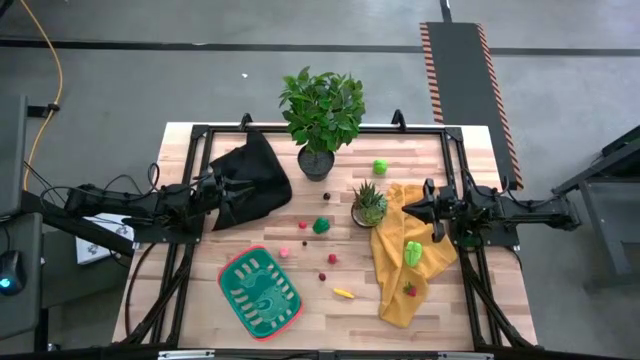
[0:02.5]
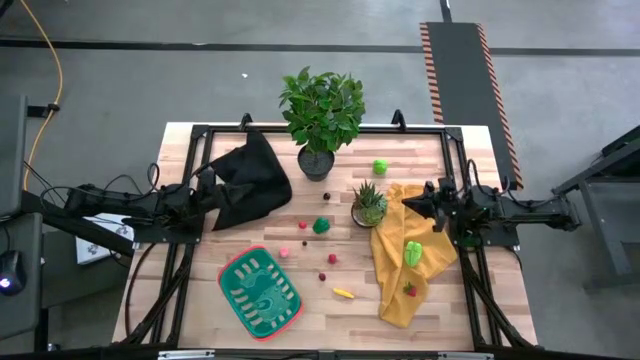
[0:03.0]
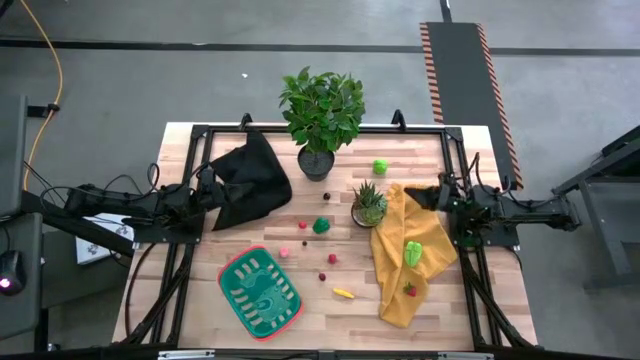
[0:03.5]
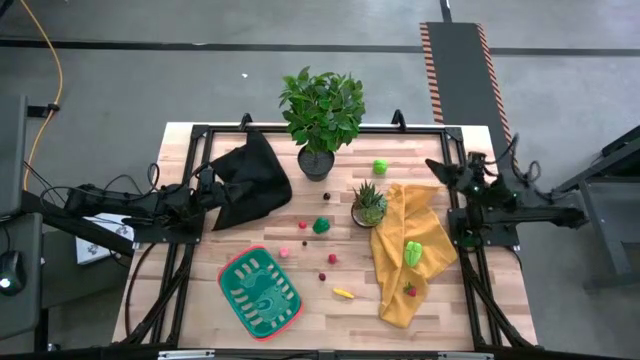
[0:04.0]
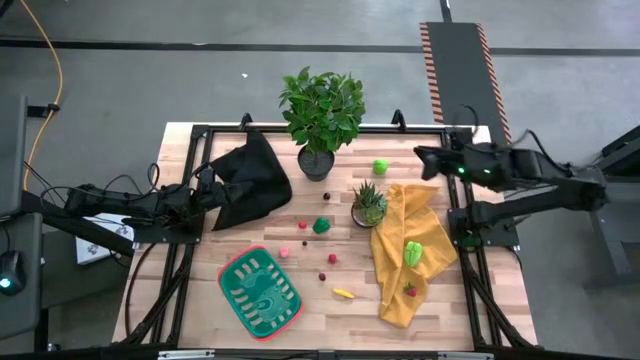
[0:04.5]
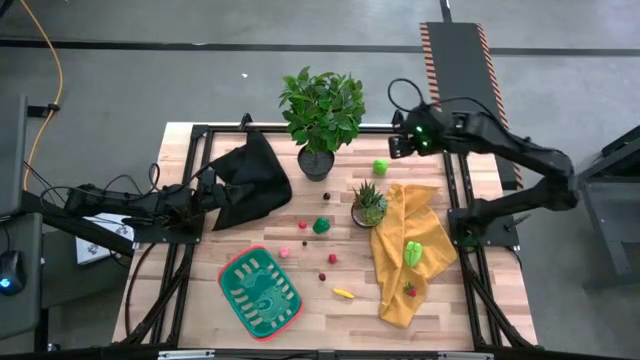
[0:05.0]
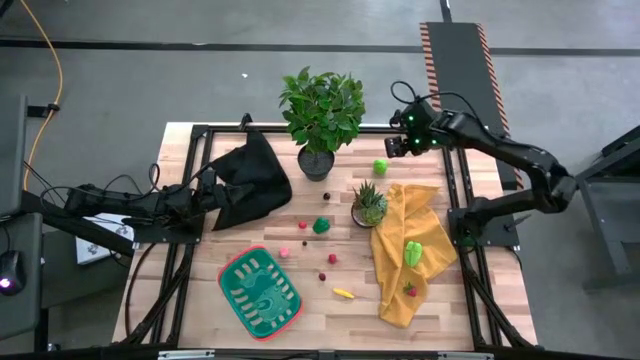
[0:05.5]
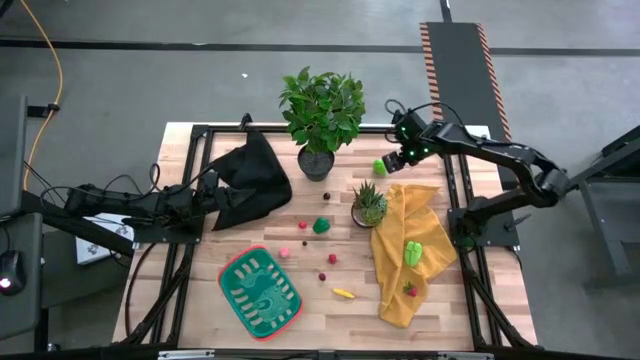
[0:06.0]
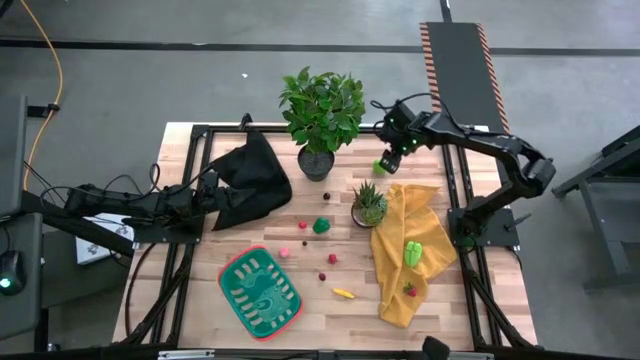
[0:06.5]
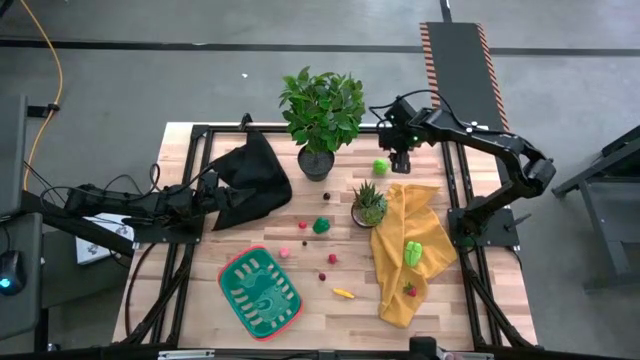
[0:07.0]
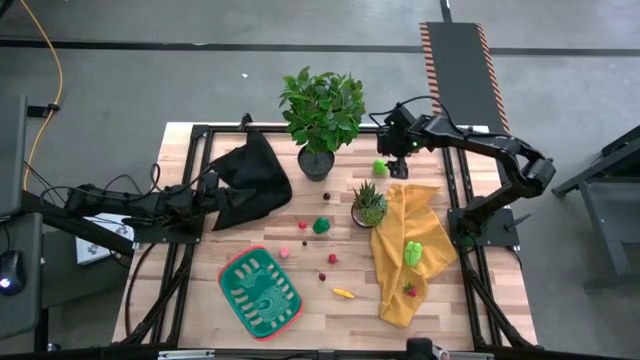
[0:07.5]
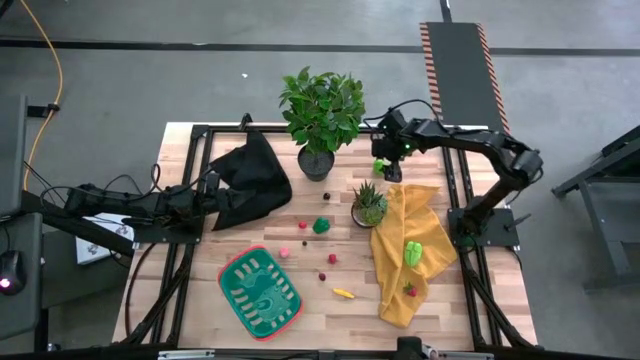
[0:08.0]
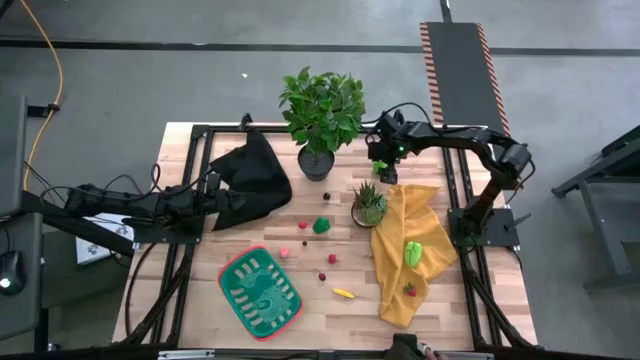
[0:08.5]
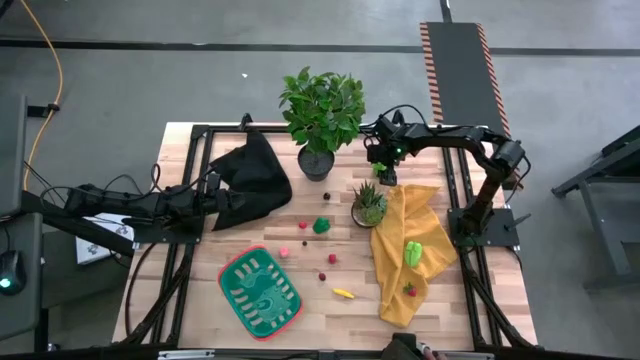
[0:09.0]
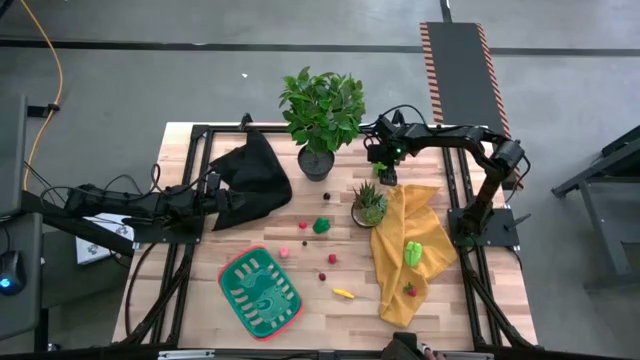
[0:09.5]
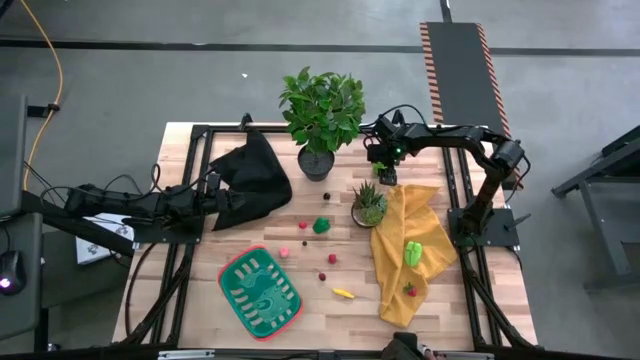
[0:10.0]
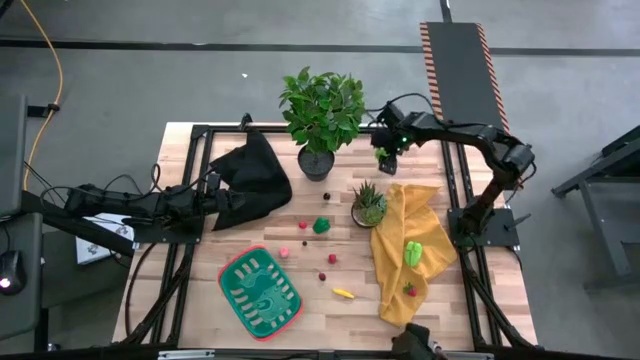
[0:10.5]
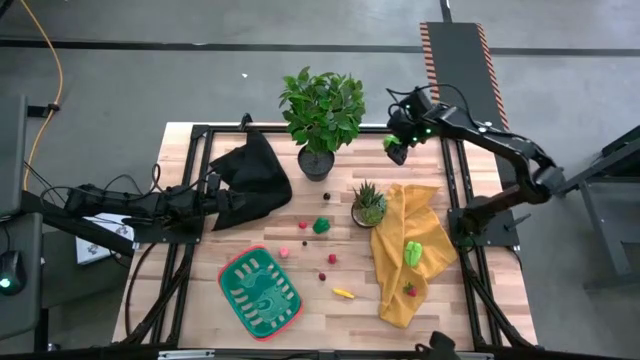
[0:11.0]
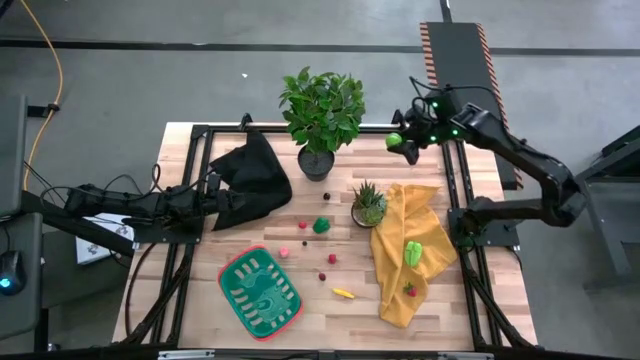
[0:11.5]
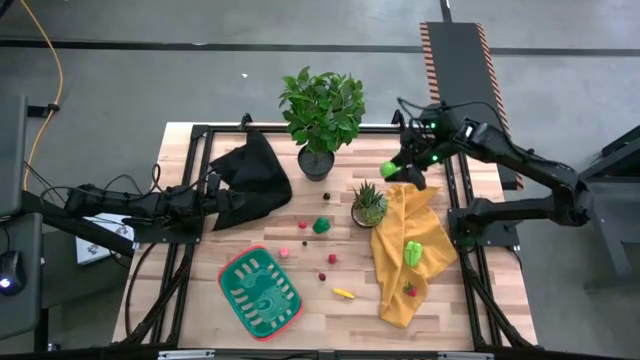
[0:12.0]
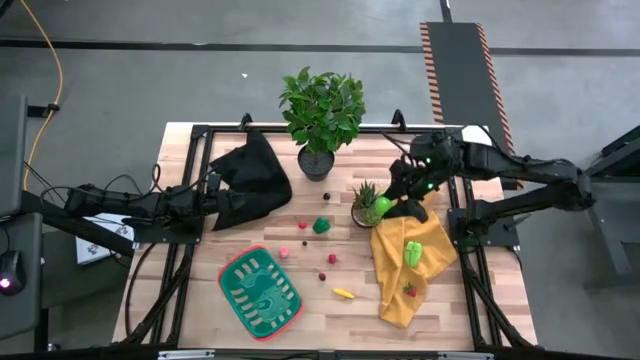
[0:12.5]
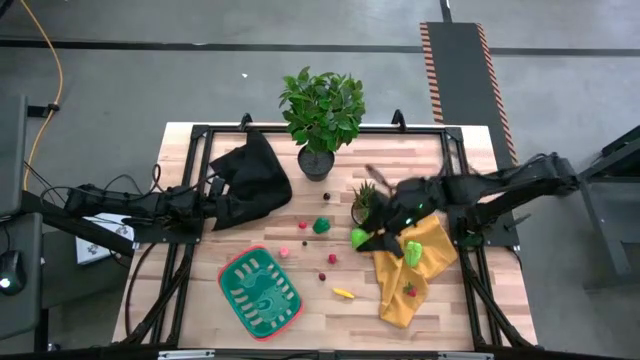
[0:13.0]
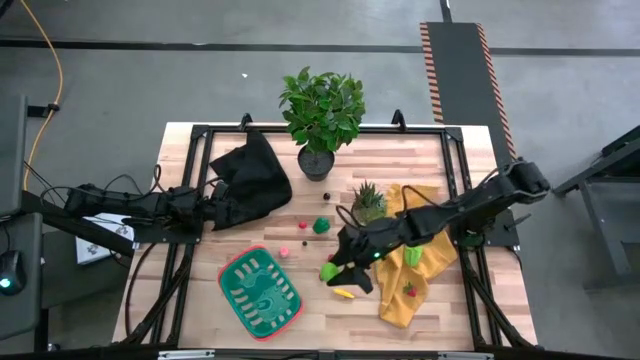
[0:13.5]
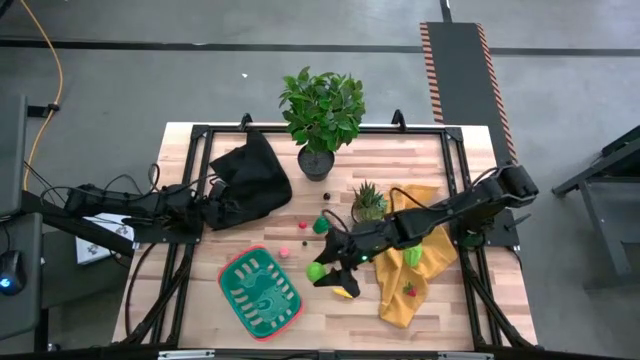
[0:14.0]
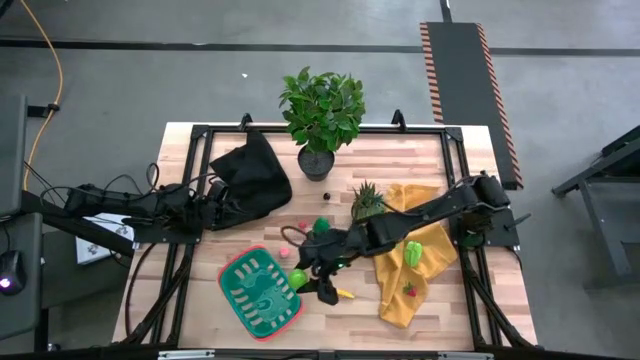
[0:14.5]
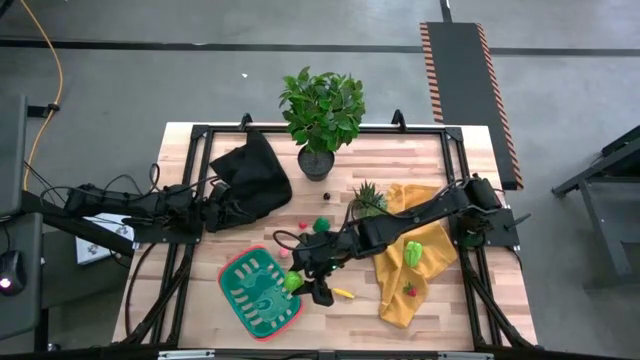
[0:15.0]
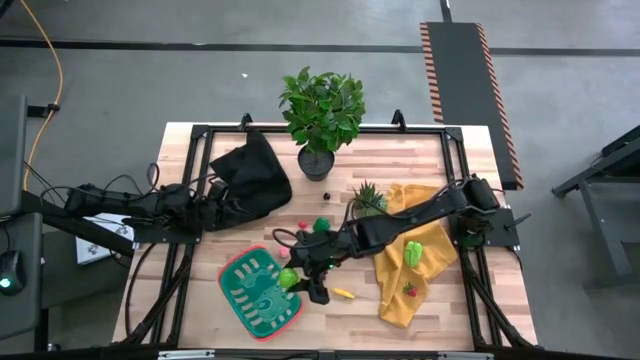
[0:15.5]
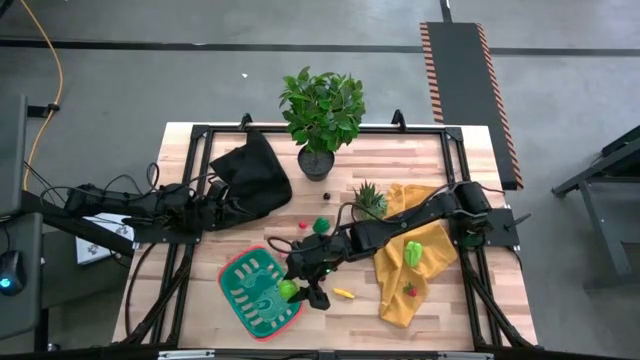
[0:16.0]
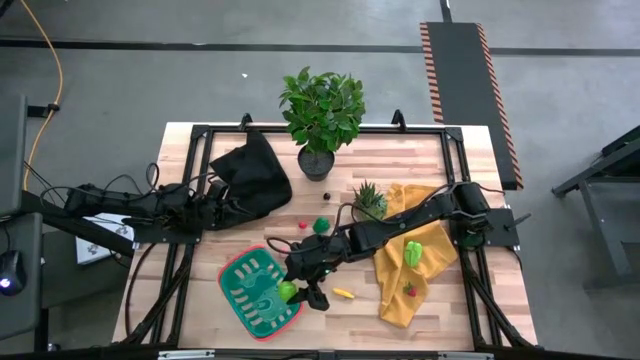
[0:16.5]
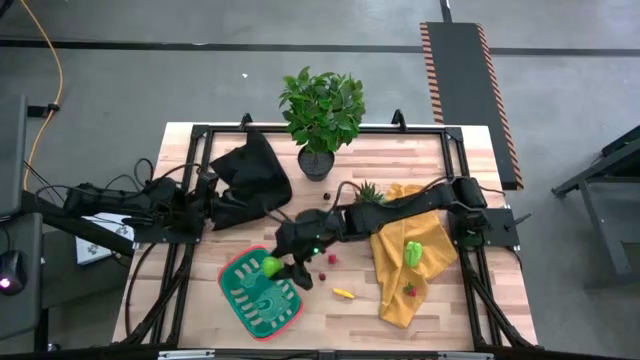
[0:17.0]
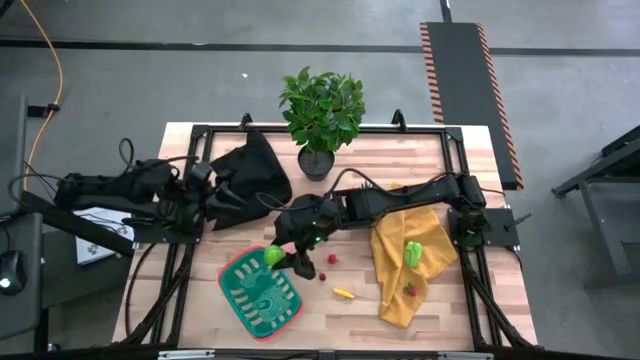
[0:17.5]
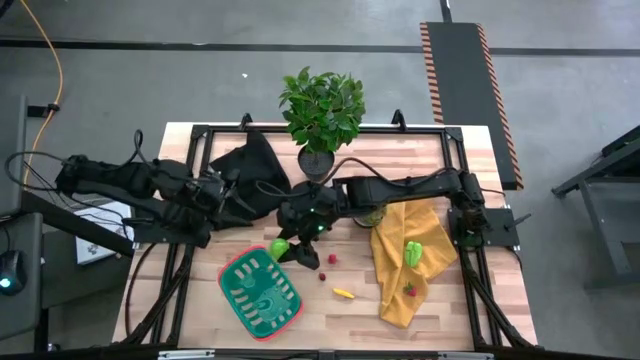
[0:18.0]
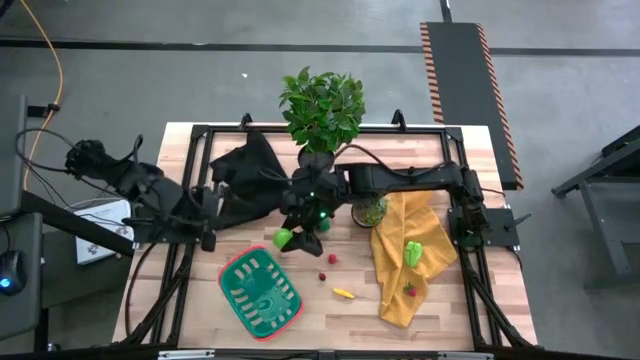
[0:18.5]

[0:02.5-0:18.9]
Task: Pick and placing Produce into tupperware
Put the green cabbage into the blue basket

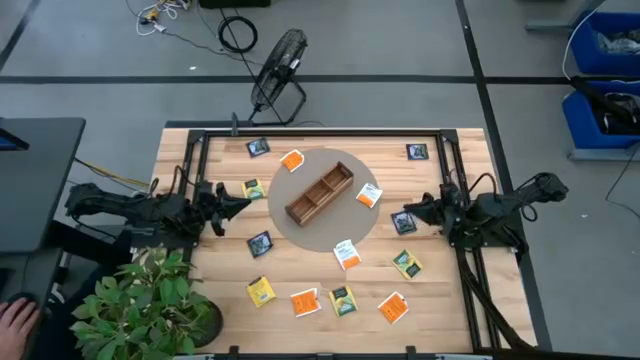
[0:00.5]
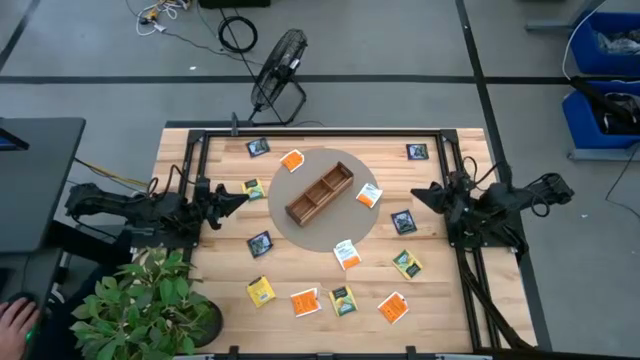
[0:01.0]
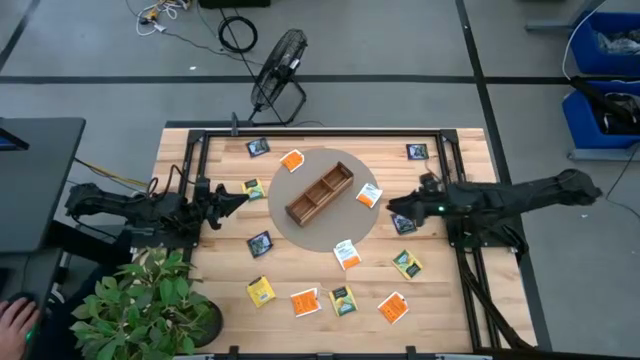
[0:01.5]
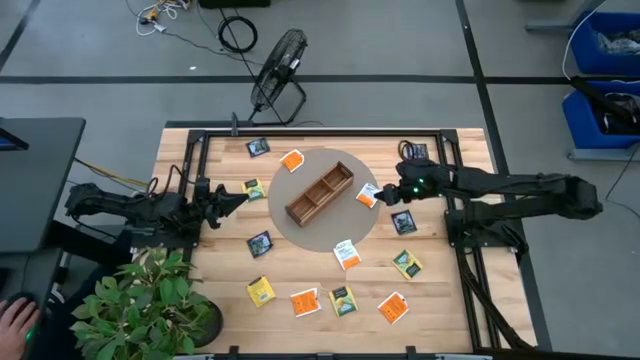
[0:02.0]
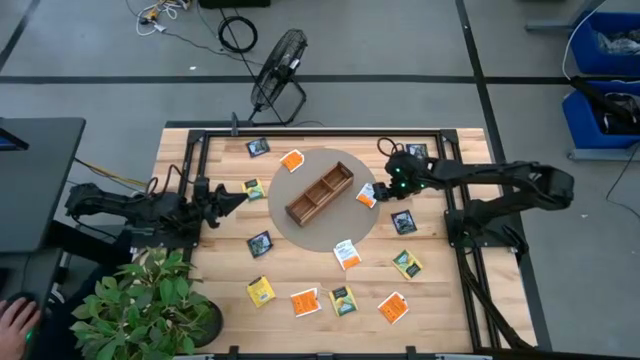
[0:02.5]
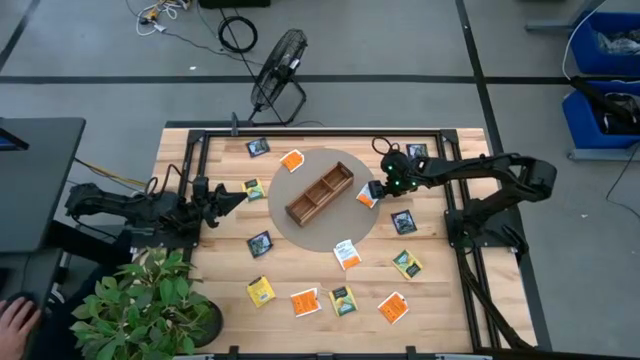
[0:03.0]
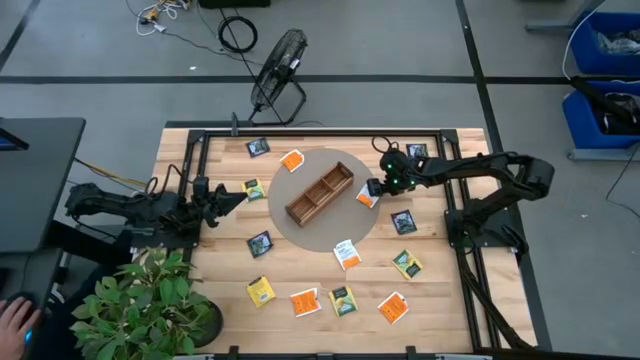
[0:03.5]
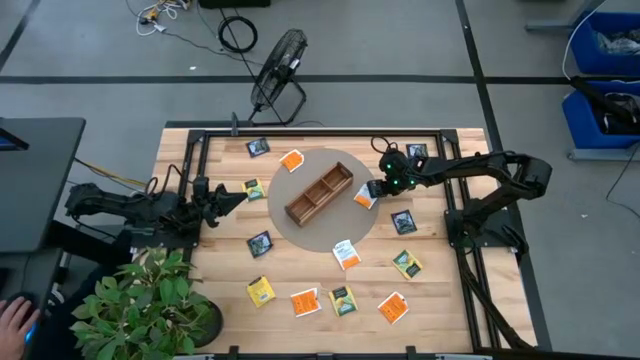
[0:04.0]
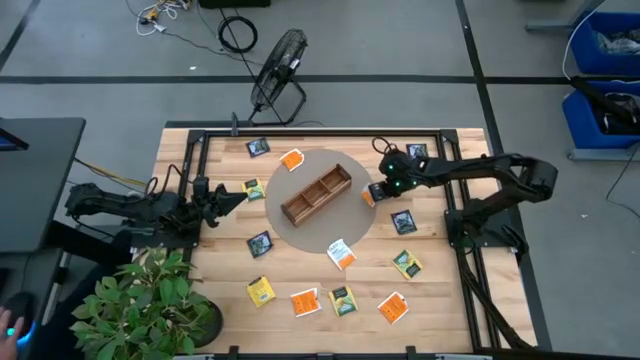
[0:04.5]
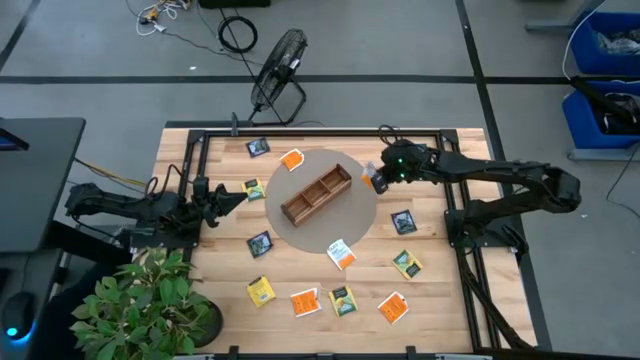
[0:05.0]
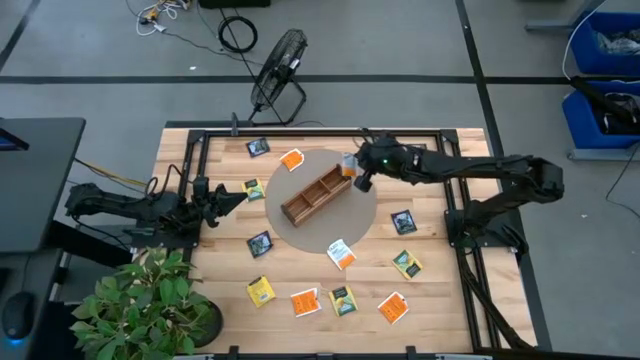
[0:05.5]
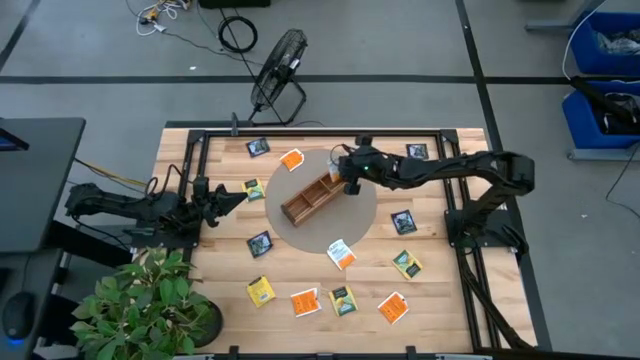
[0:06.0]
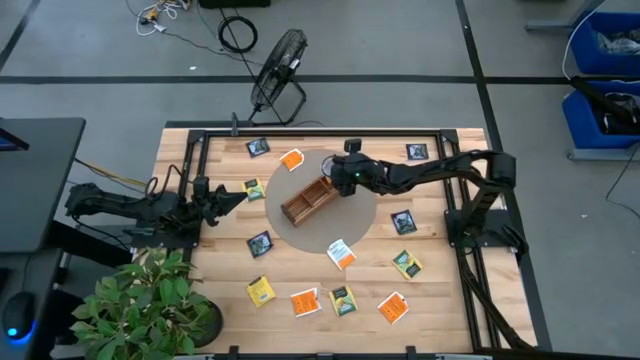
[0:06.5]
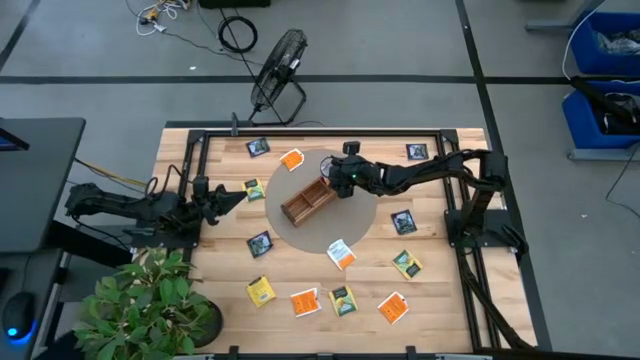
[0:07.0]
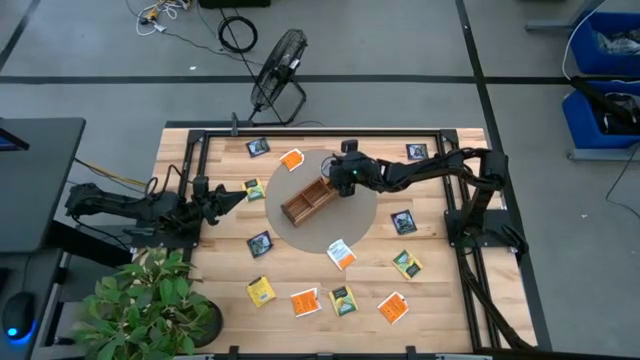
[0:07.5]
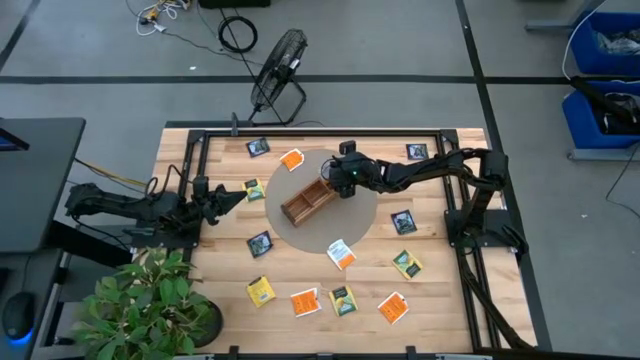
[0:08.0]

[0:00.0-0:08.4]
Task: Pick & Place Tea
Put the orange tea bag into the right section of the wooden organizer
